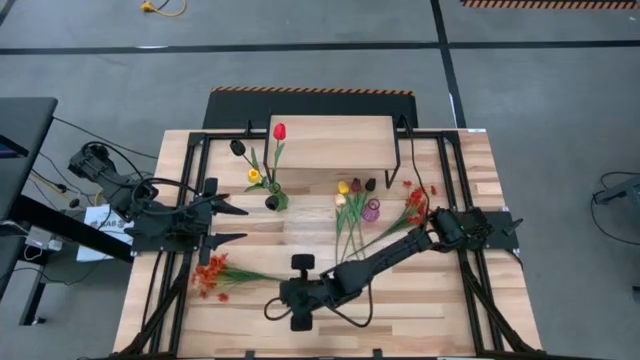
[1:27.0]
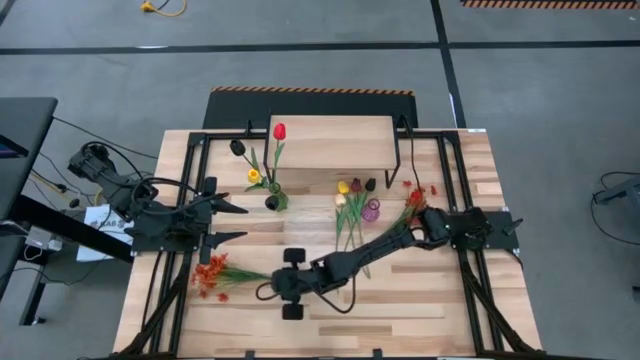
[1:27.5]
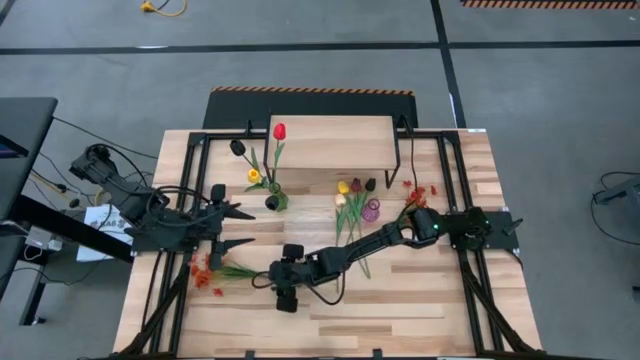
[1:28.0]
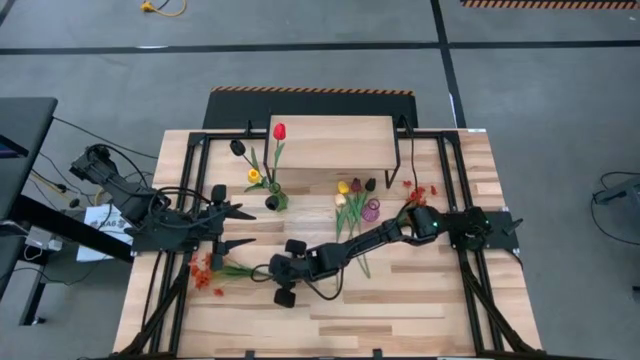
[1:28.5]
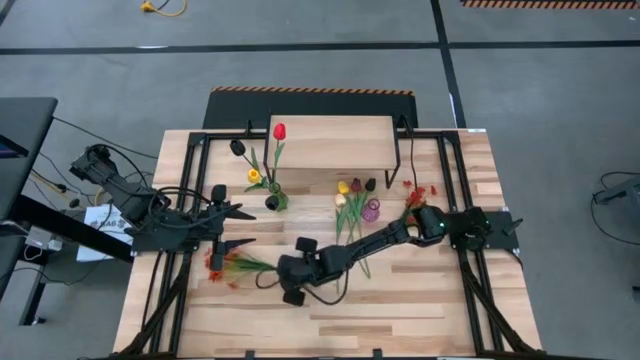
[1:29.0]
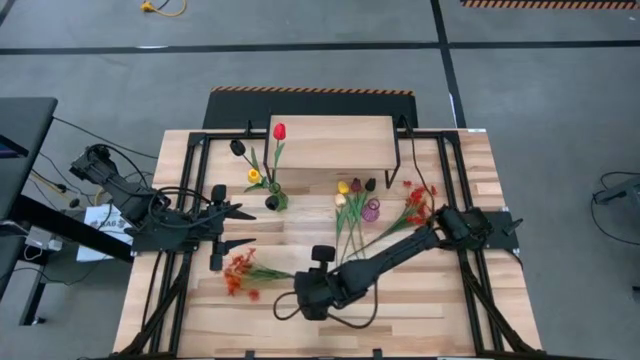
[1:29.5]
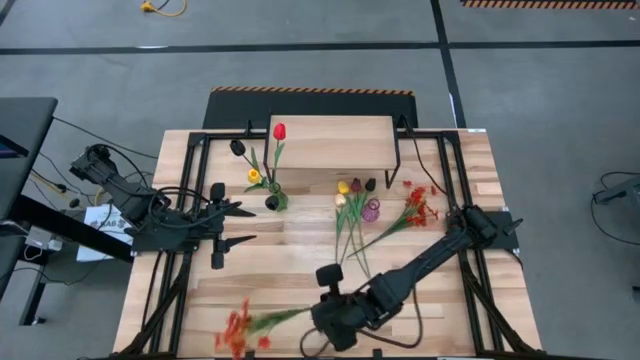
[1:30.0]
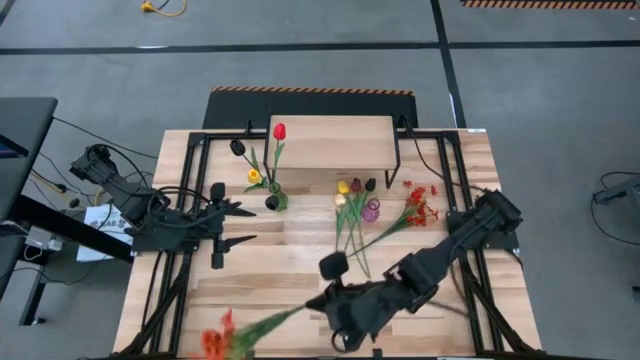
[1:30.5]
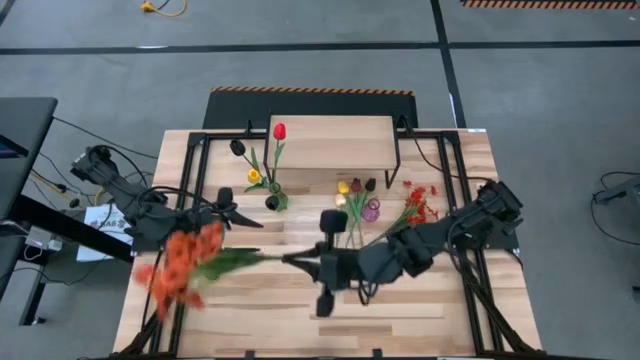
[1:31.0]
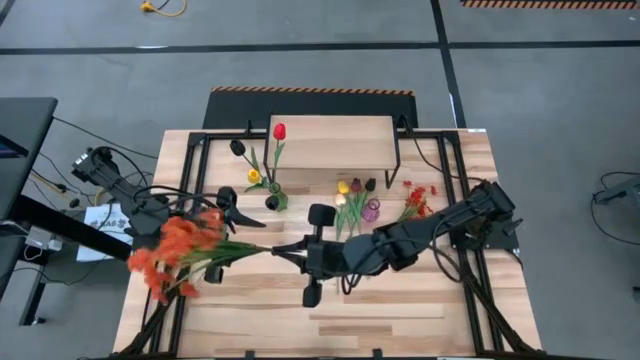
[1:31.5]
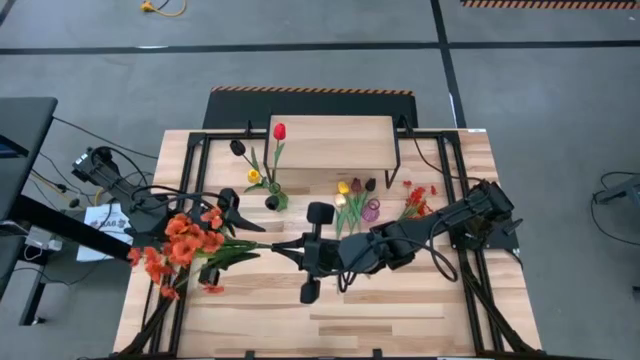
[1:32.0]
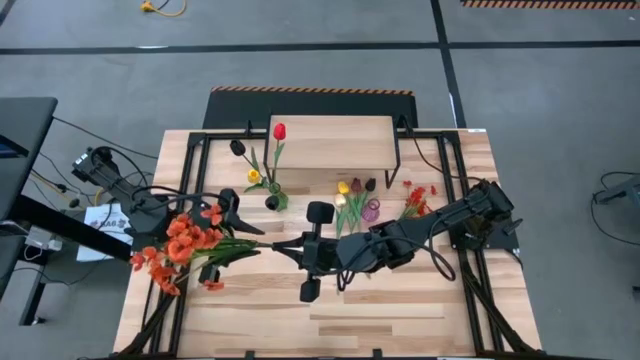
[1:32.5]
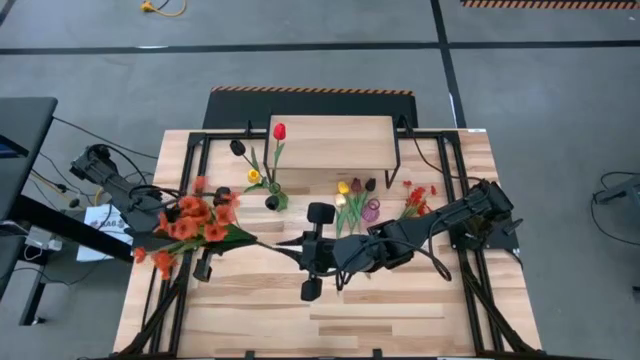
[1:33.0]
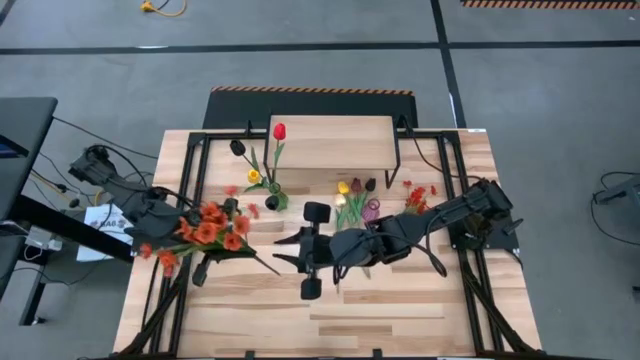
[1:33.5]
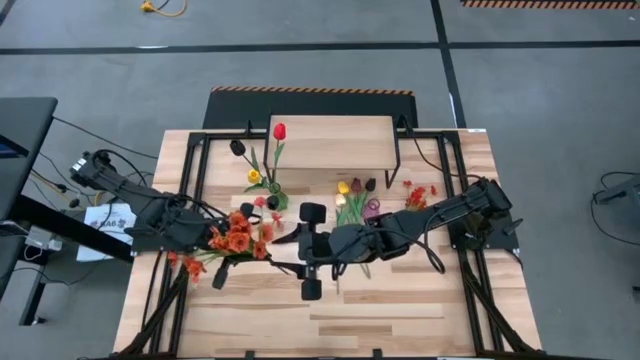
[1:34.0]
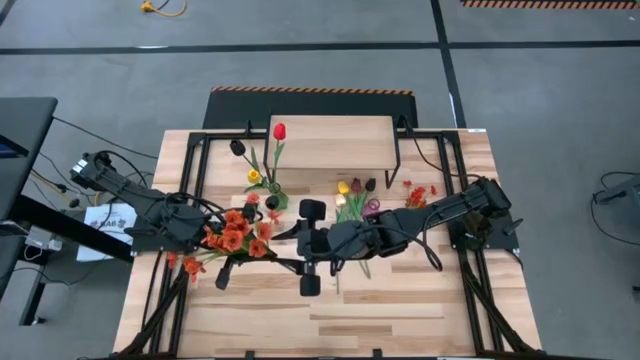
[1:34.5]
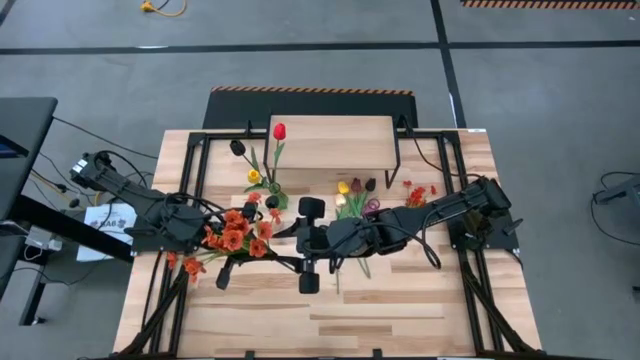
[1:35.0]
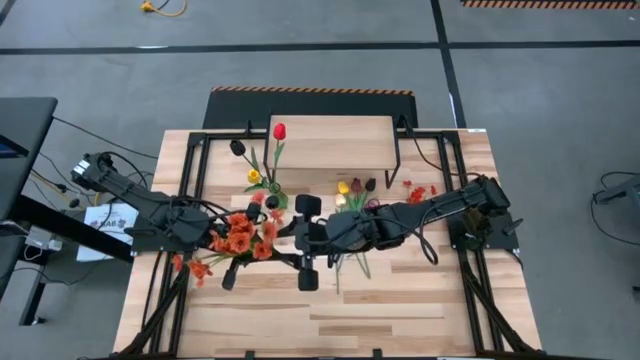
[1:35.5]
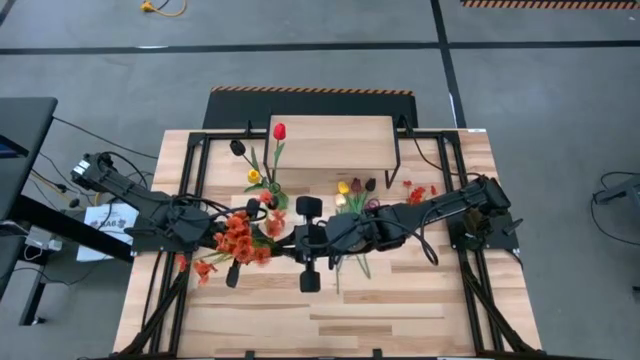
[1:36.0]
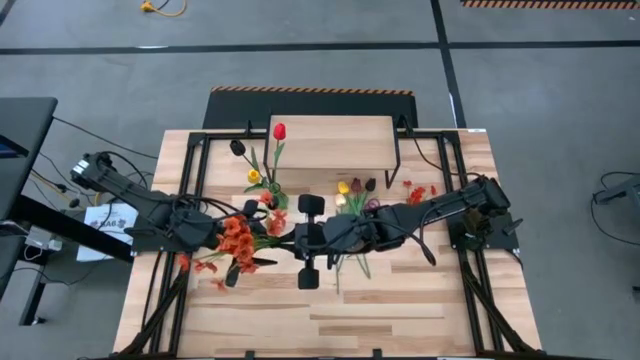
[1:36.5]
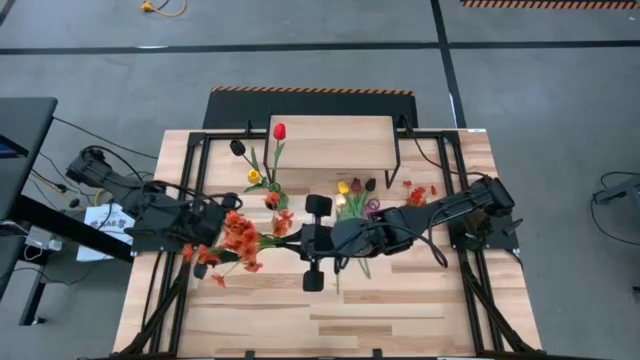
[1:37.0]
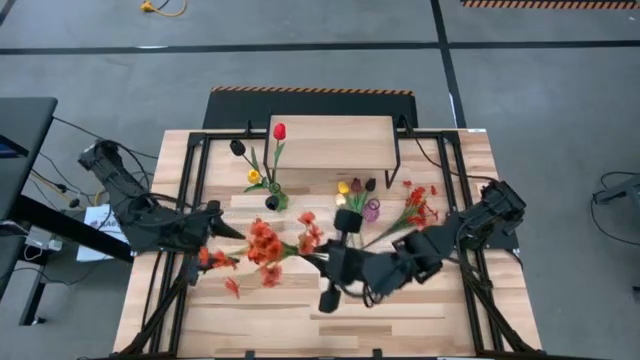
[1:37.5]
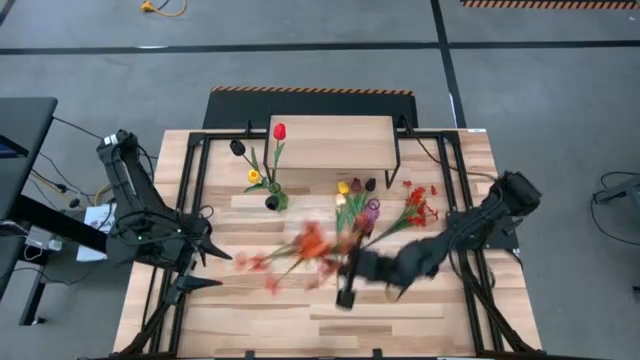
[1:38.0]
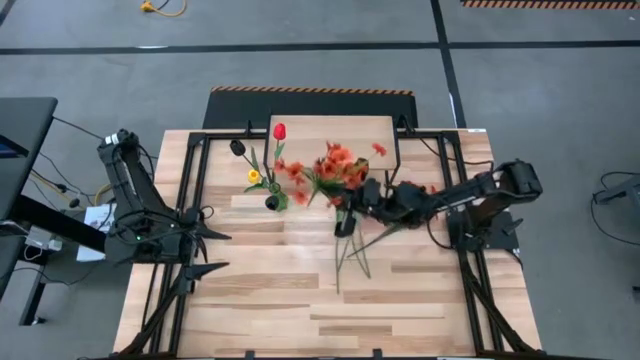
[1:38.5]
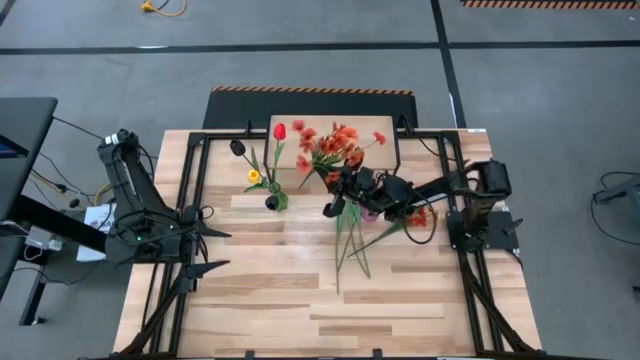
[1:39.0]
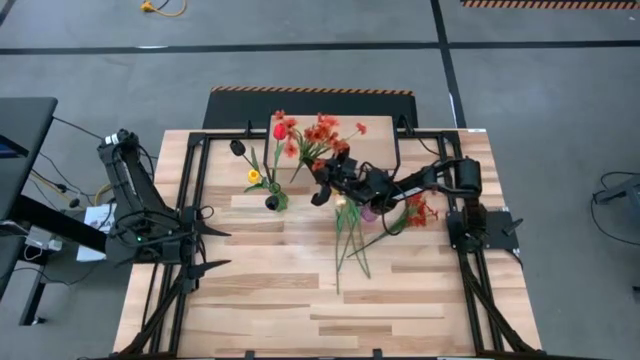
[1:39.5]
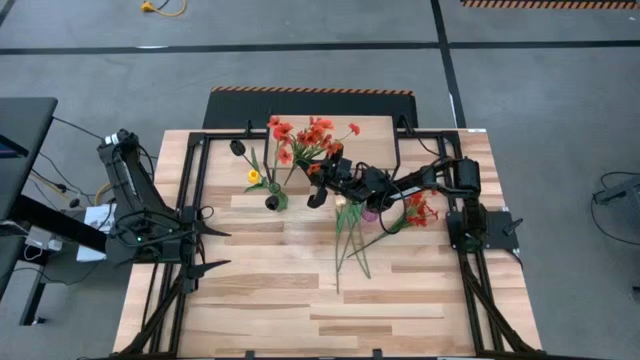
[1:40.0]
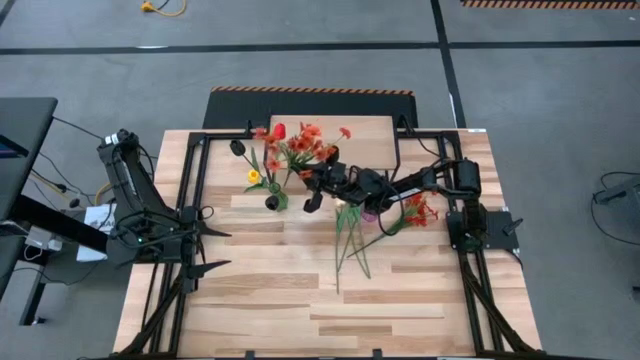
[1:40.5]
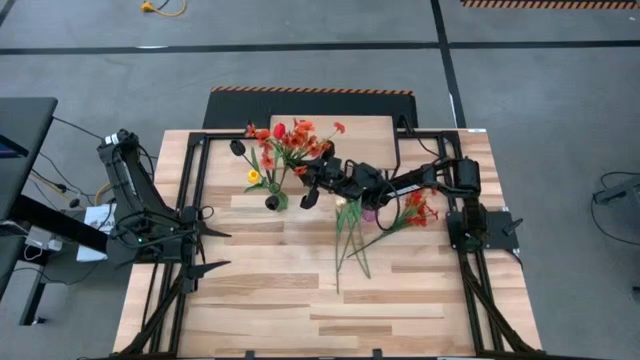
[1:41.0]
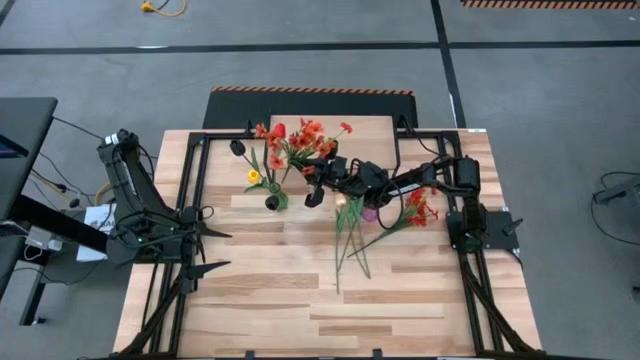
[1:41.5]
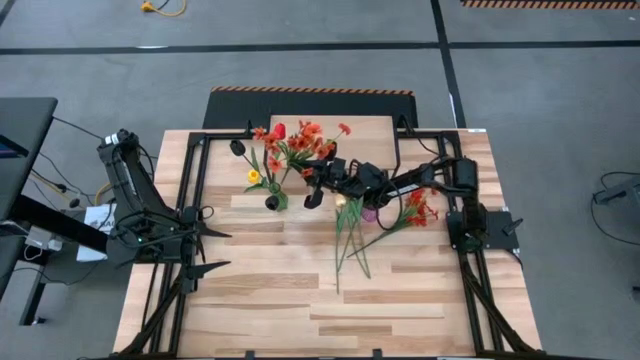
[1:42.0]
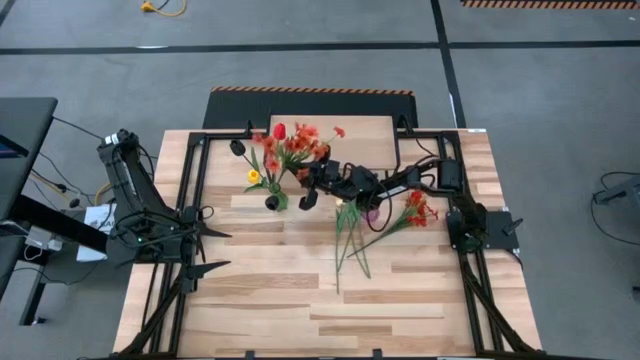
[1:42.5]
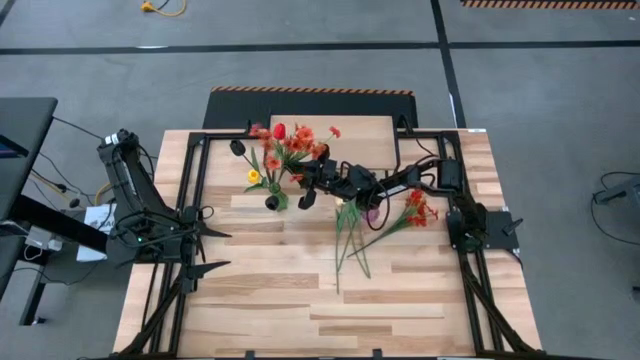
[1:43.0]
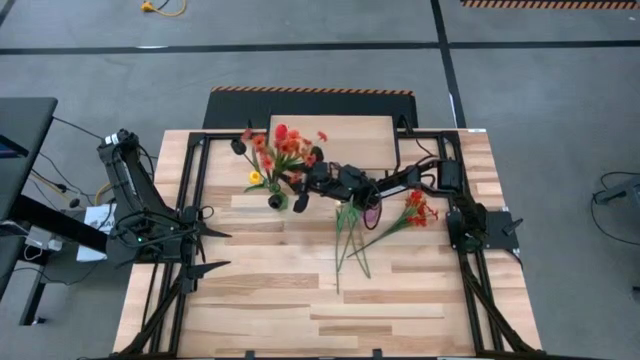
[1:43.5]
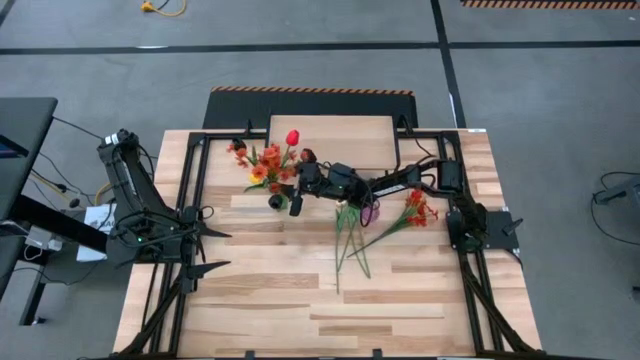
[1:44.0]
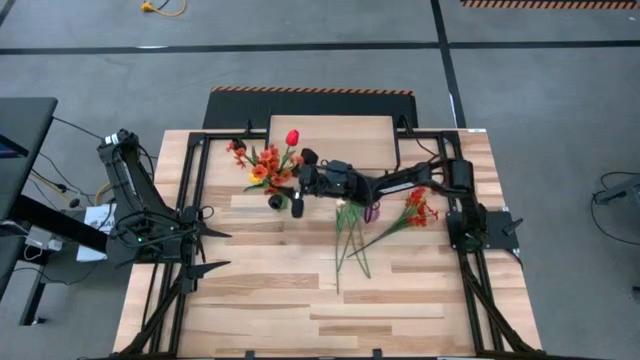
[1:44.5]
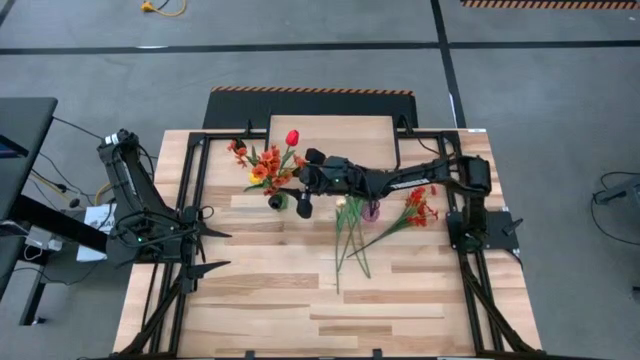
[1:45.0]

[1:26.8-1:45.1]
Task: Pick and place flowers into a vace then onto a shelf
Put the left orange flowers into the green vase
